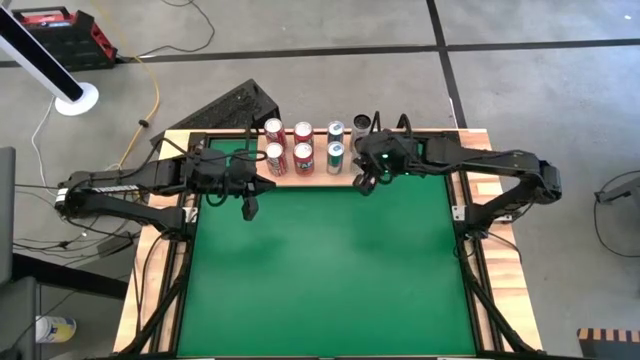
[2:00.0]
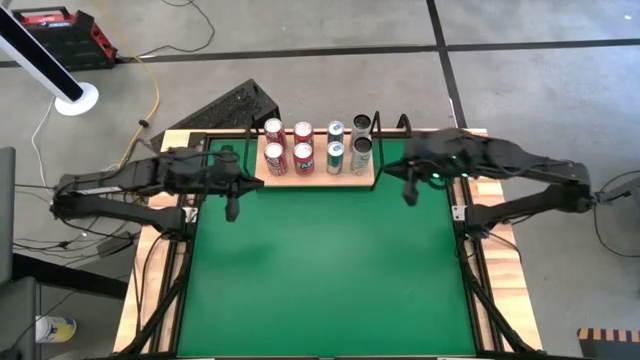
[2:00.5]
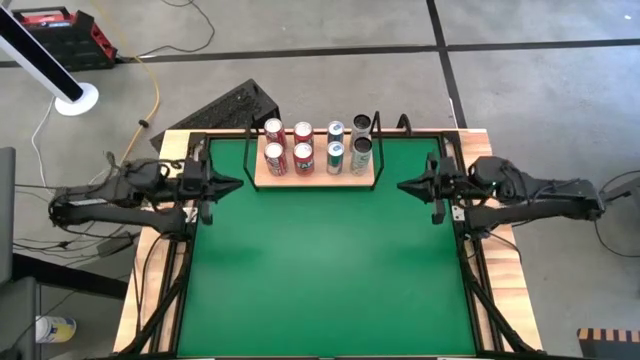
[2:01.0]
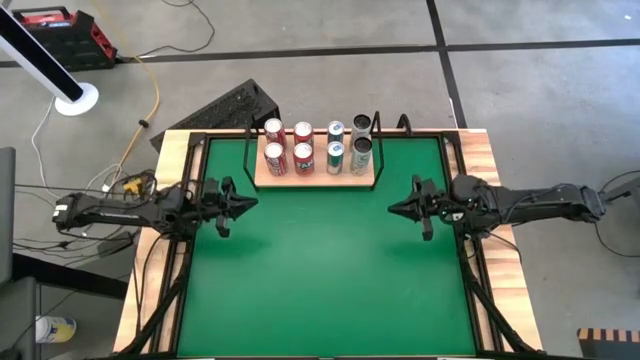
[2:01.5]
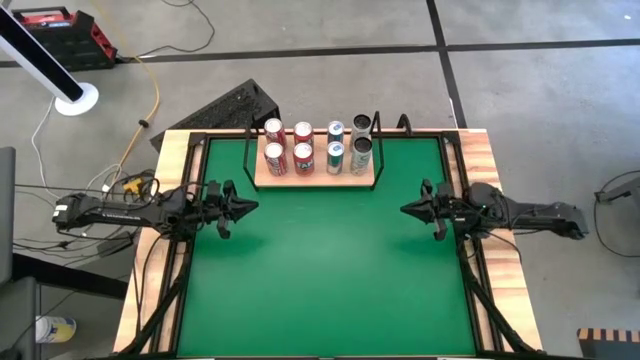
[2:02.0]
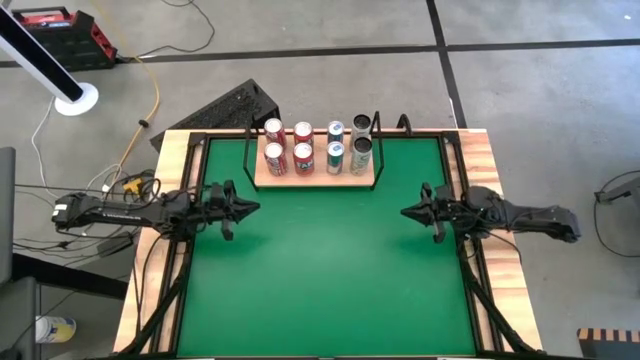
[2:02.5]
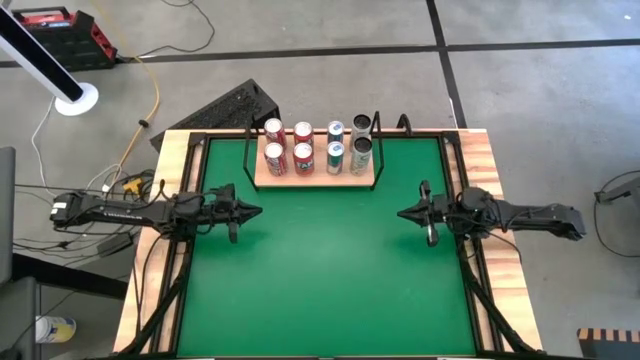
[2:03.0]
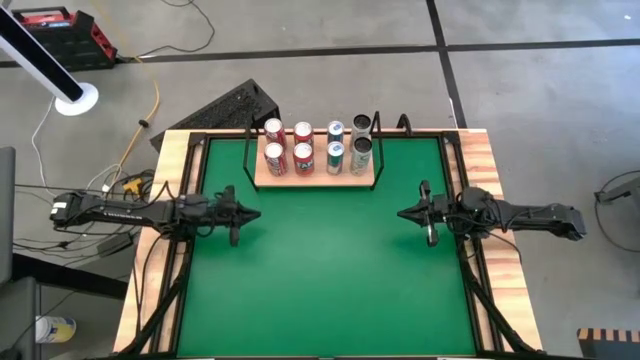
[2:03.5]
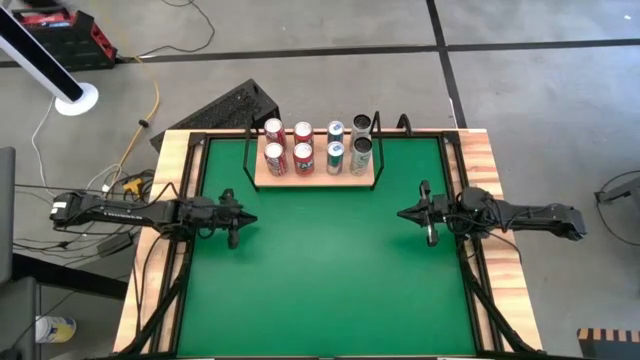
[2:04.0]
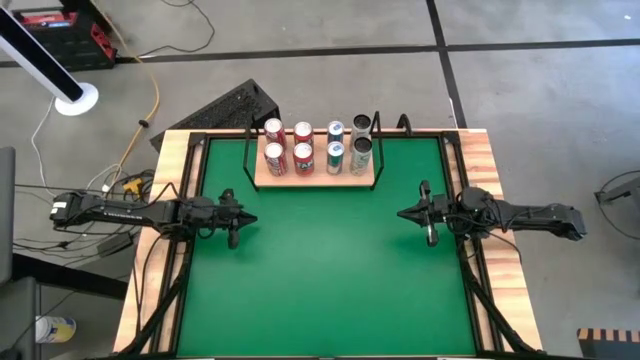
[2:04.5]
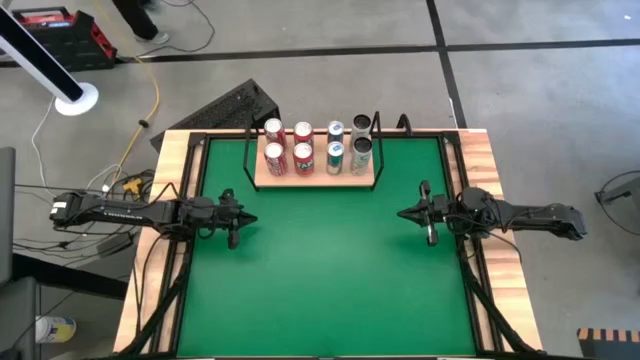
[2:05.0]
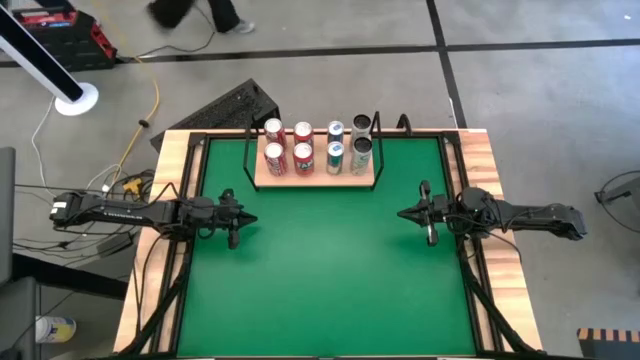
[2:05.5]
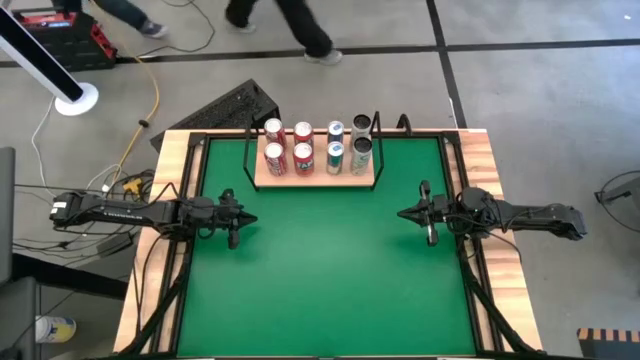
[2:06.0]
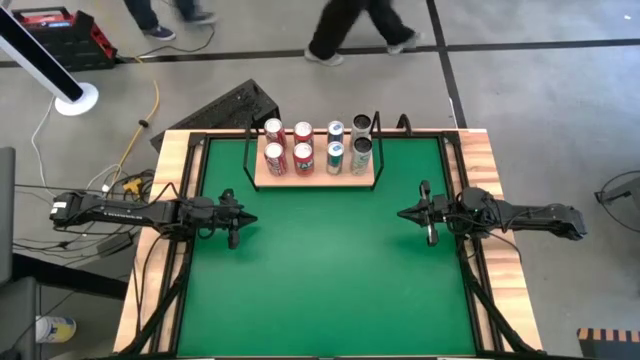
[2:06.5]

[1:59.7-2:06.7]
Task: Place canned beverage on shelf
Return to Home Position

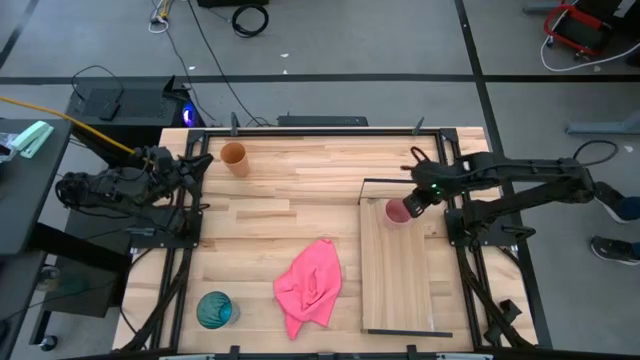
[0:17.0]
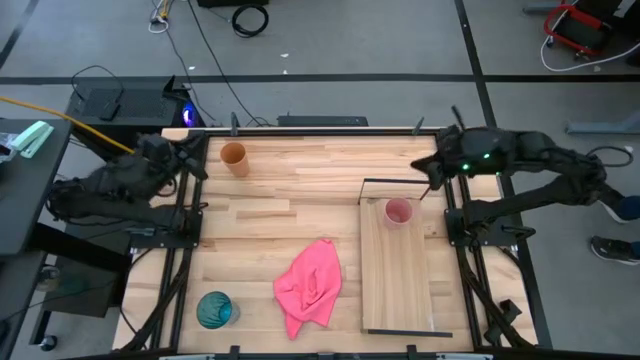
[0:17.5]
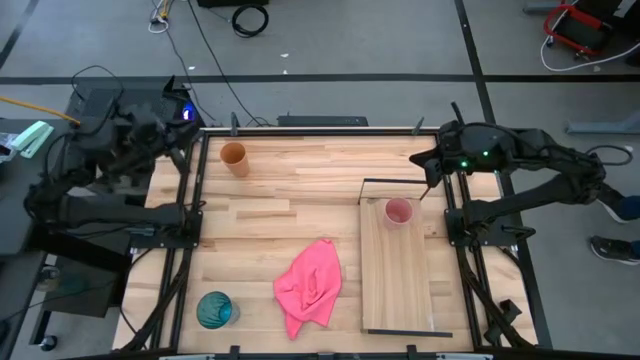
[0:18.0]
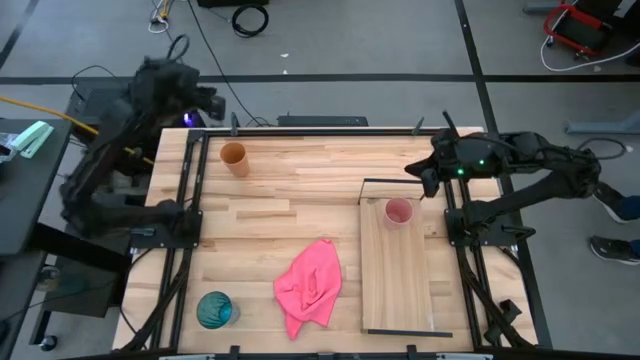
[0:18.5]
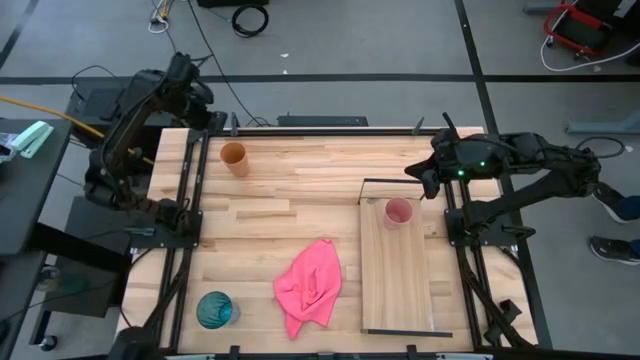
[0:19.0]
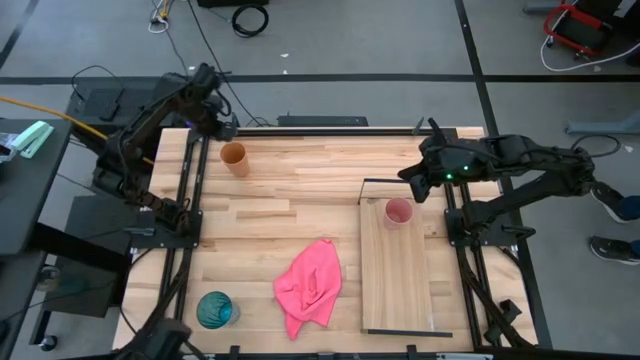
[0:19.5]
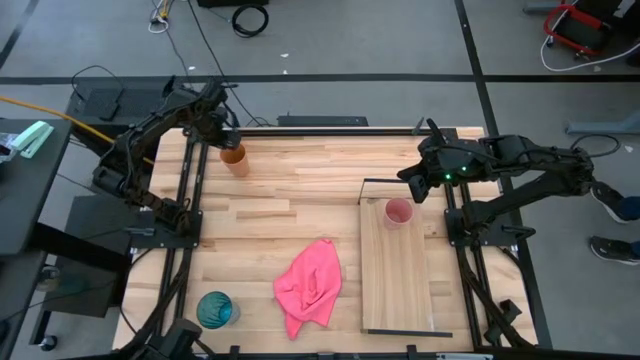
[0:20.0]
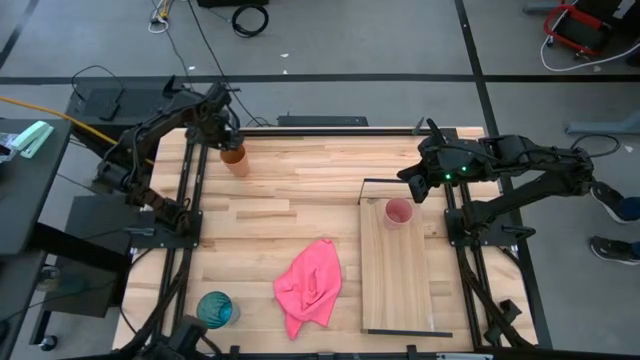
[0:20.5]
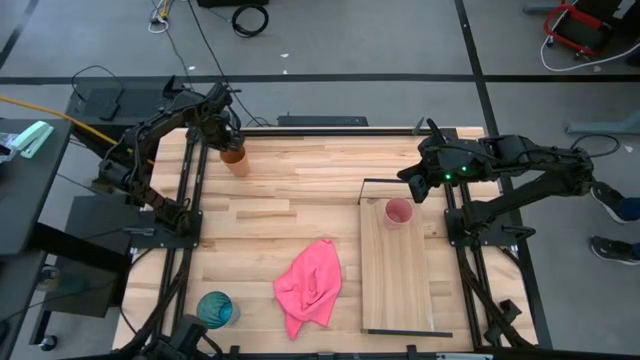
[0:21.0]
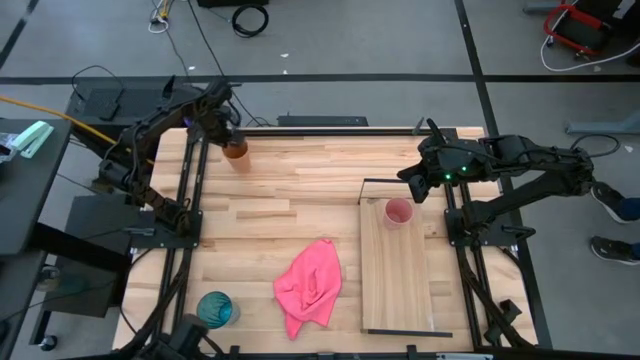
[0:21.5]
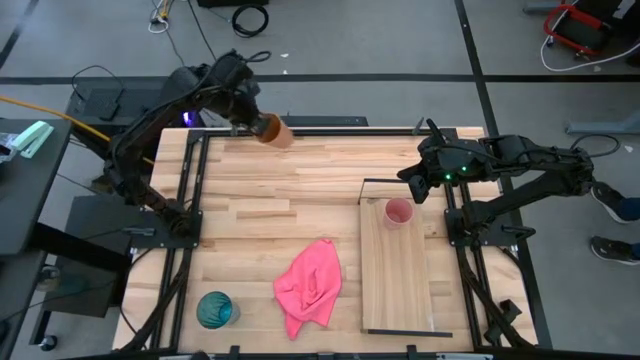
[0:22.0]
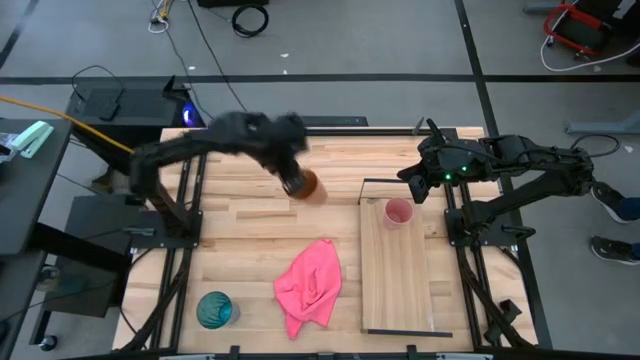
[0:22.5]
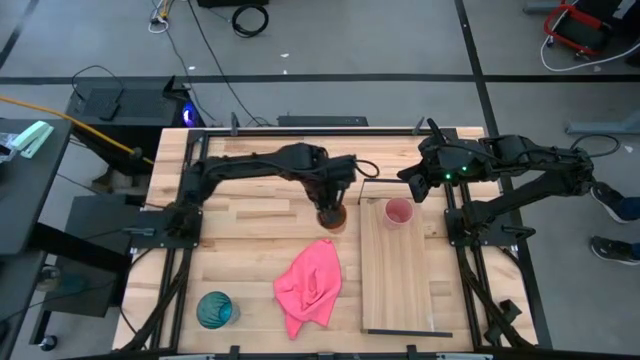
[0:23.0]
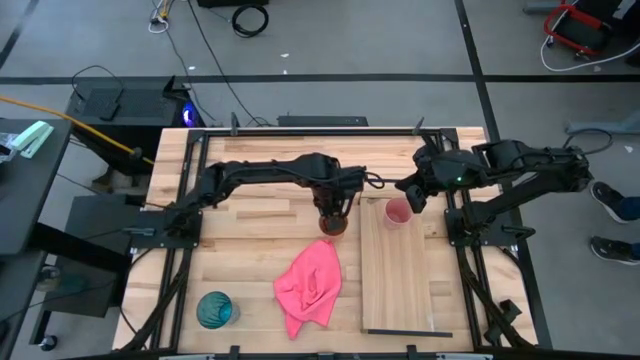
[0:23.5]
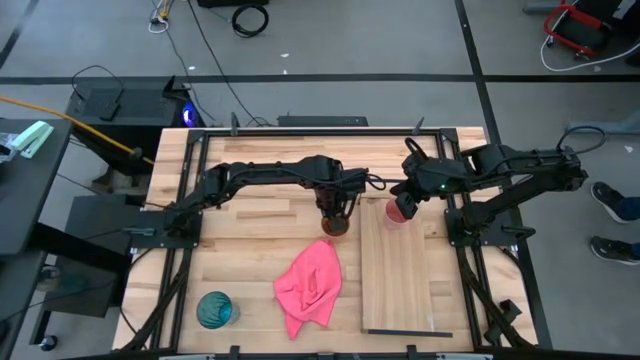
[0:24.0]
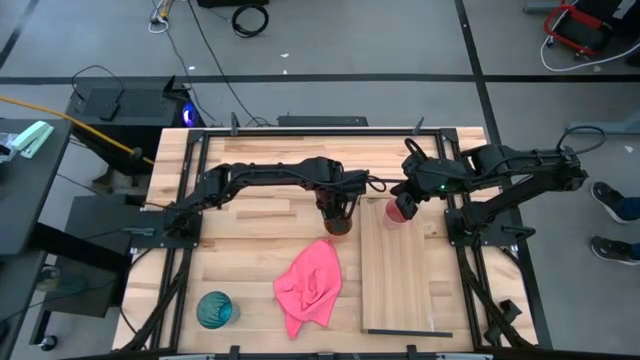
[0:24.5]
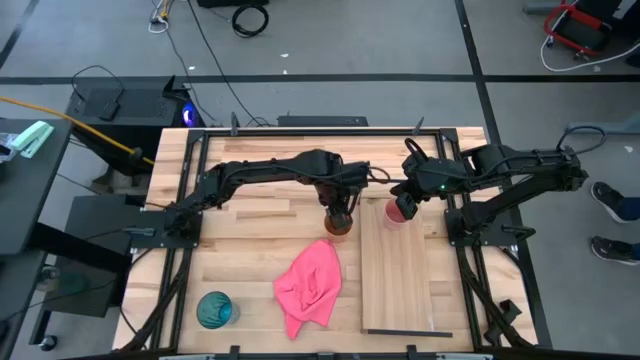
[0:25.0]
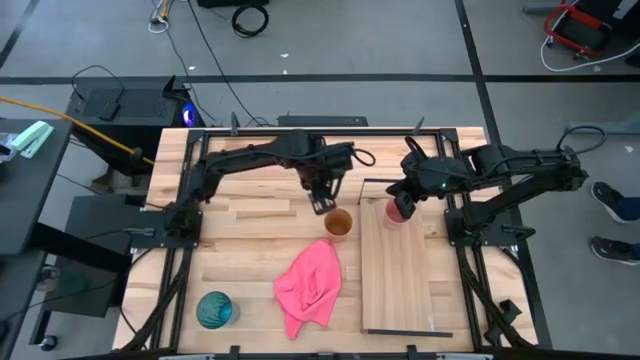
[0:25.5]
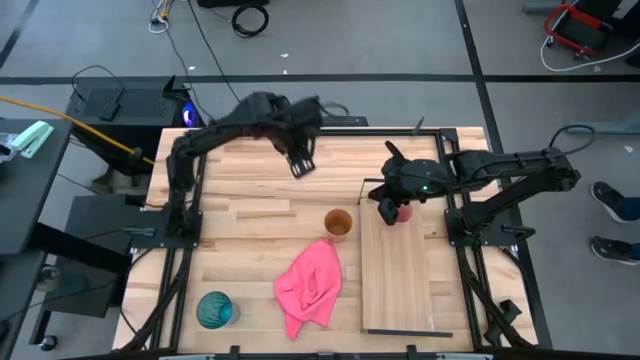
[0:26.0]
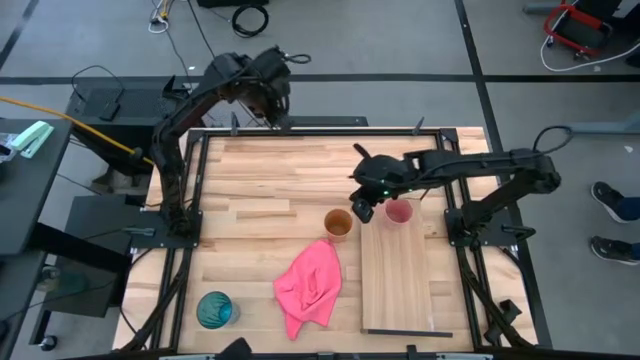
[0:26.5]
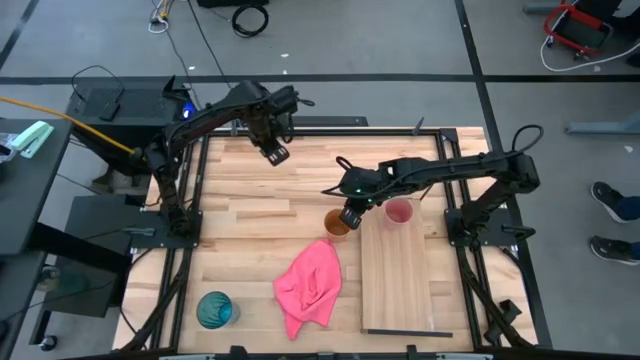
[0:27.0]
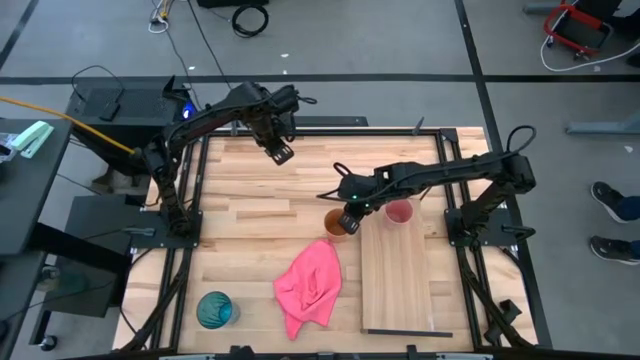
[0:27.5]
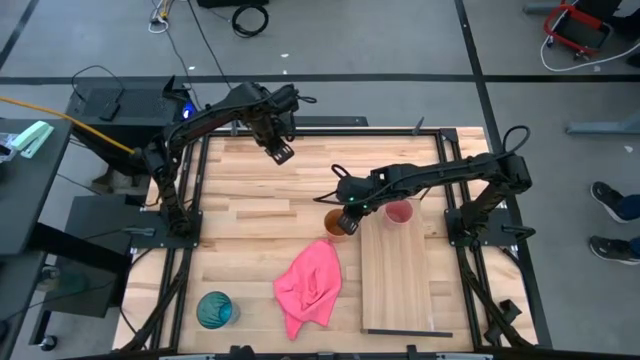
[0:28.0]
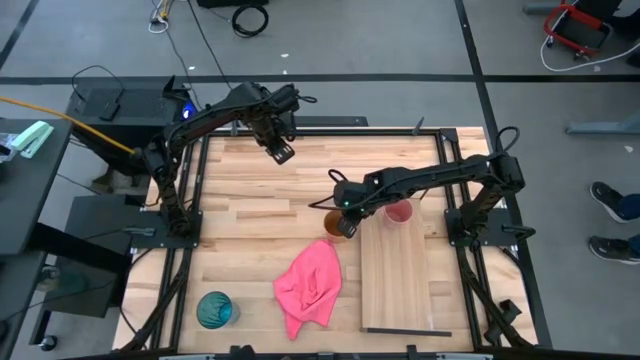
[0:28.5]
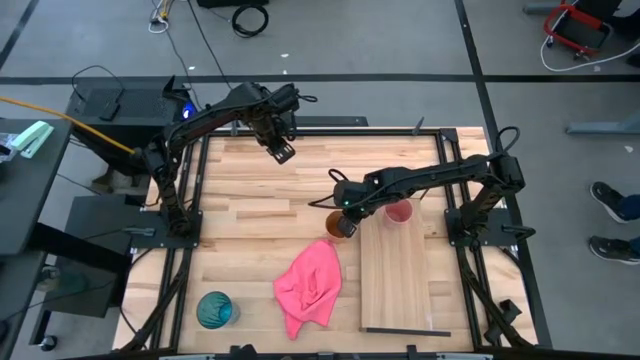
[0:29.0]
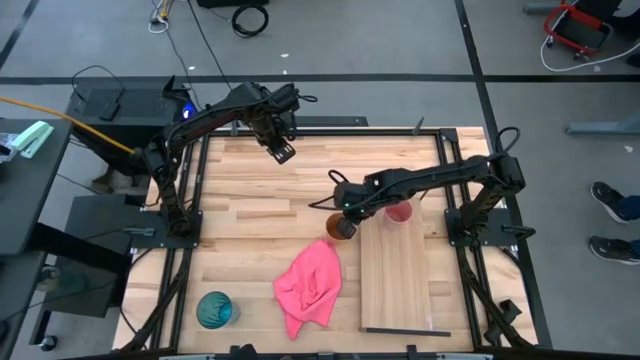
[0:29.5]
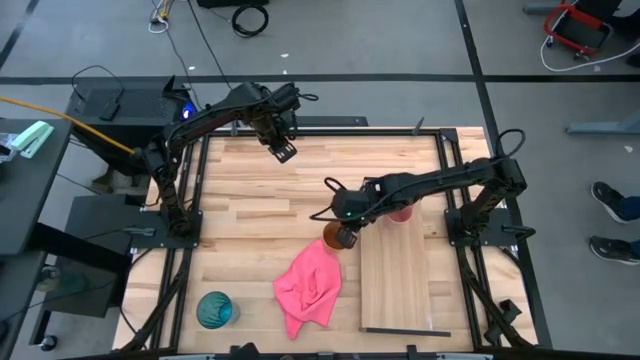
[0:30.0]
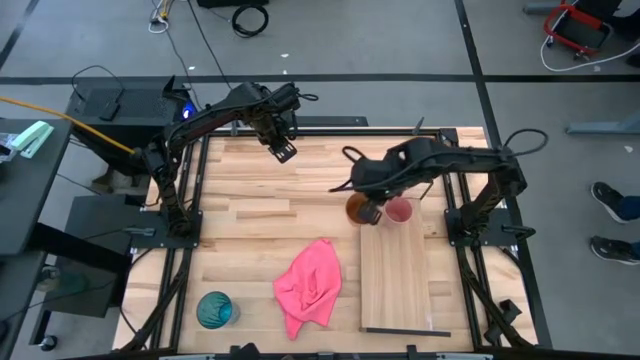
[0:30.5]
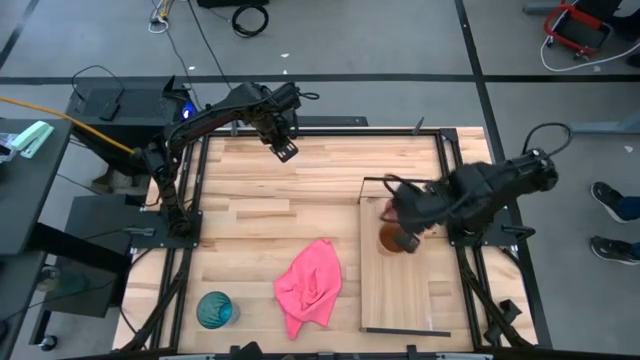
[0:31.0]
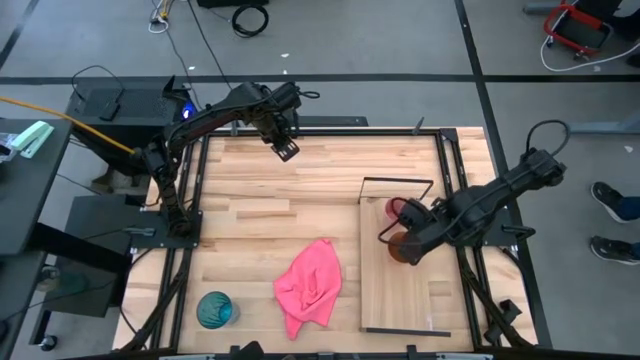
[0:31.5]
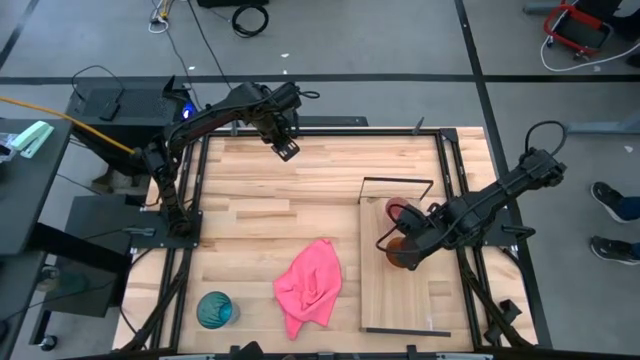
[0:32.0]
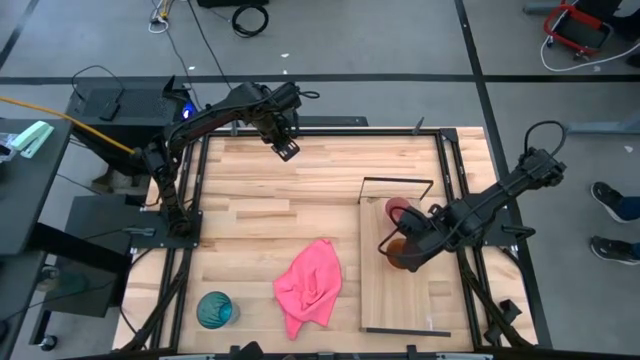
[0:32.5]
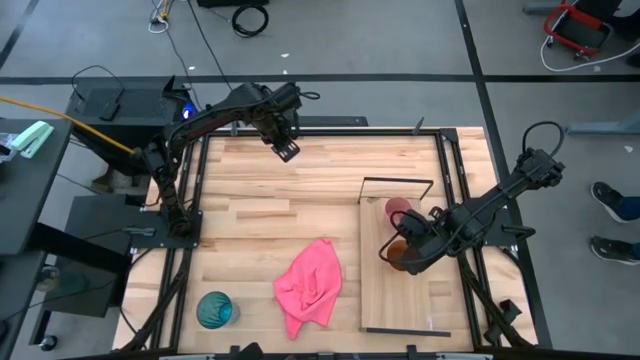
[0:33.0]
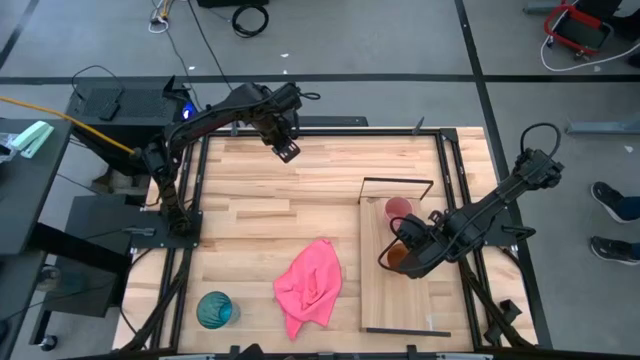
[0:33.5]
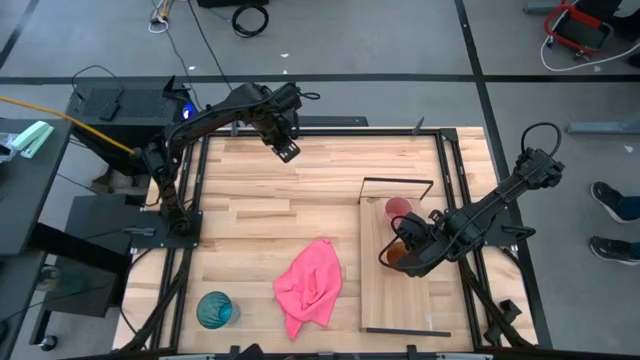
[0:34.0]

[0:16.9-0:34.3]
Task: Stack small to large cups/mugs on shelf
Put the orange cup on the shelf
